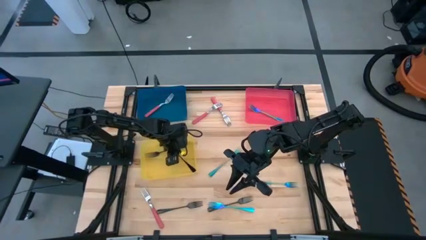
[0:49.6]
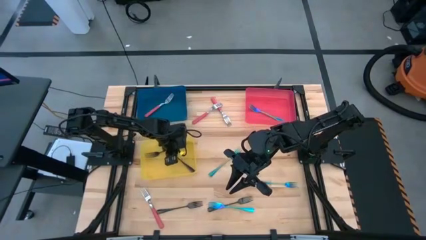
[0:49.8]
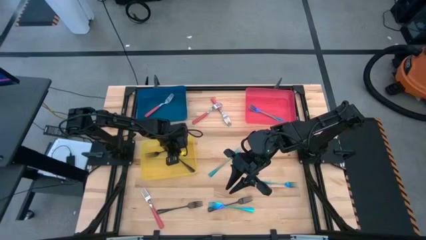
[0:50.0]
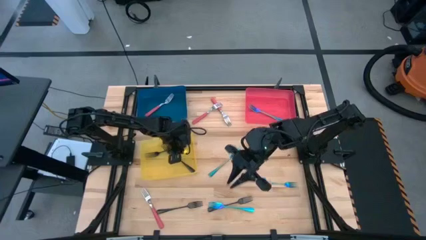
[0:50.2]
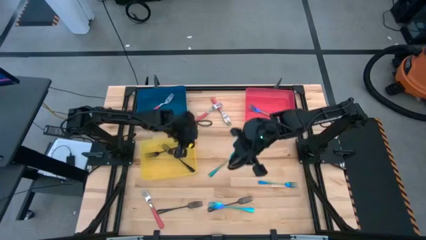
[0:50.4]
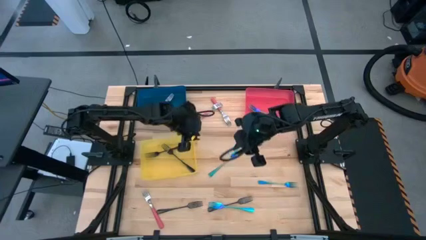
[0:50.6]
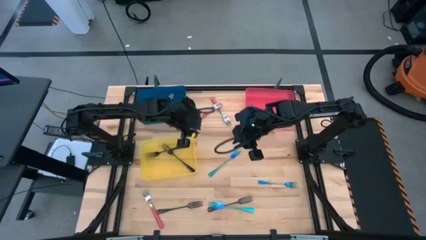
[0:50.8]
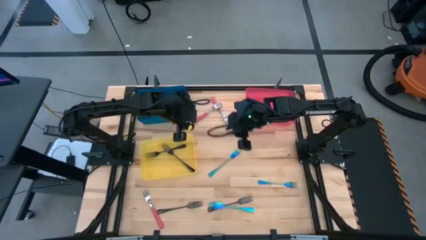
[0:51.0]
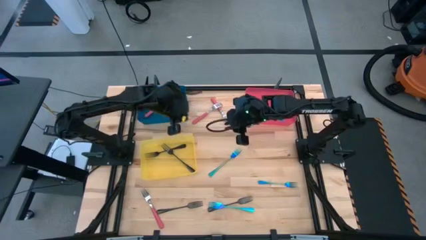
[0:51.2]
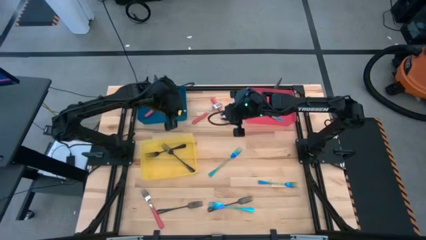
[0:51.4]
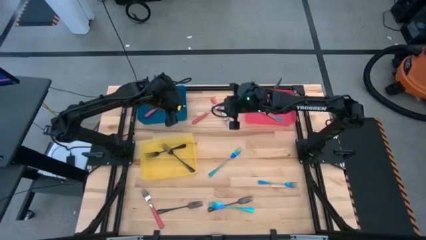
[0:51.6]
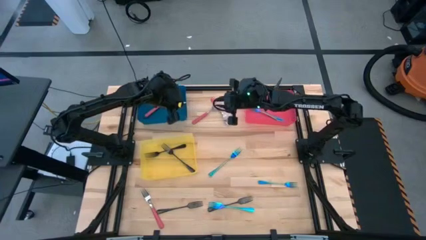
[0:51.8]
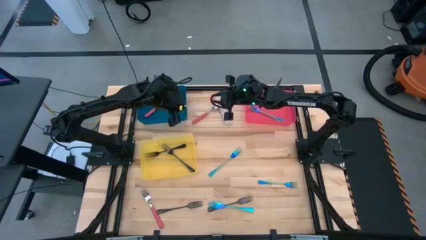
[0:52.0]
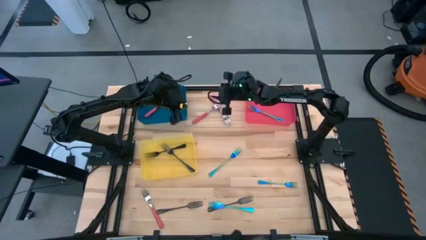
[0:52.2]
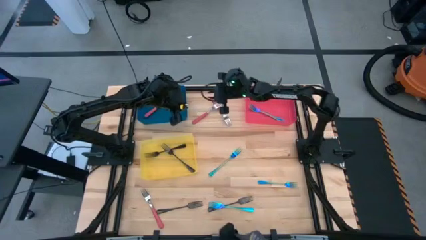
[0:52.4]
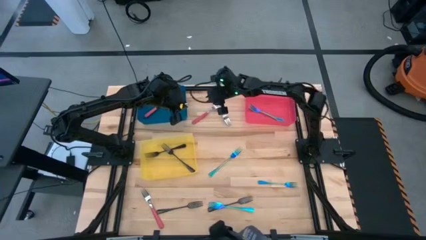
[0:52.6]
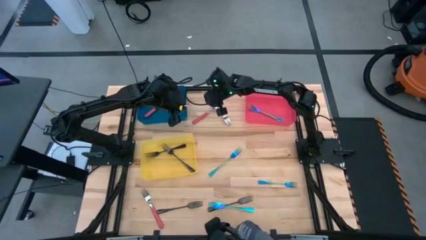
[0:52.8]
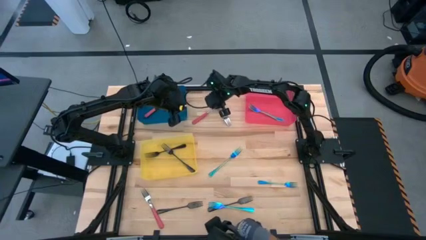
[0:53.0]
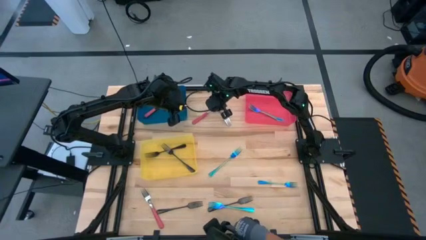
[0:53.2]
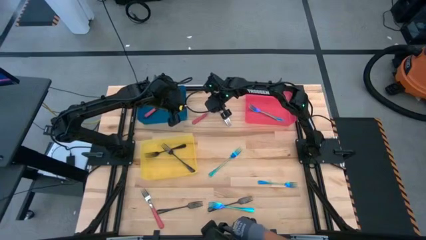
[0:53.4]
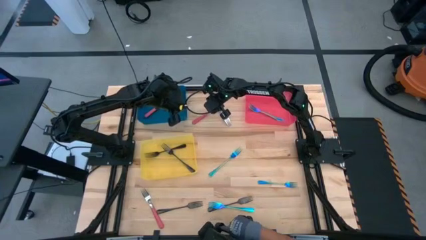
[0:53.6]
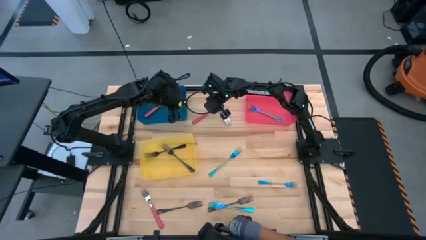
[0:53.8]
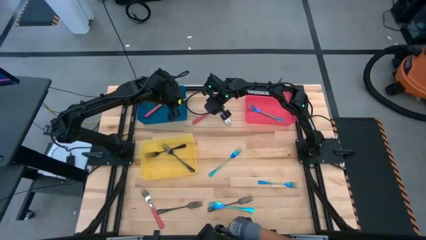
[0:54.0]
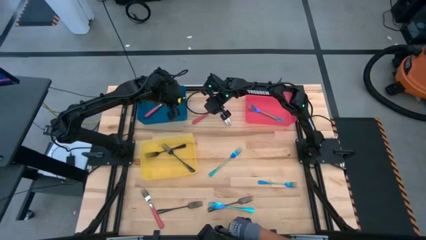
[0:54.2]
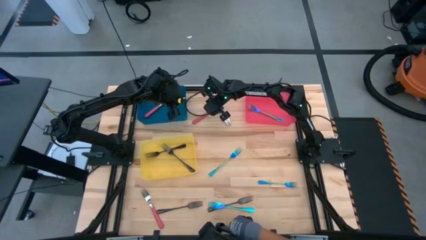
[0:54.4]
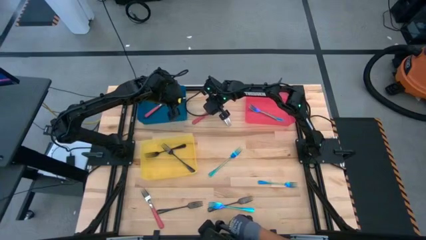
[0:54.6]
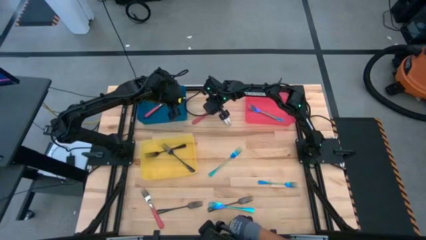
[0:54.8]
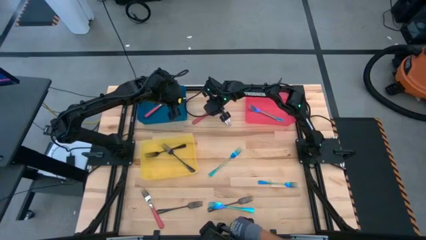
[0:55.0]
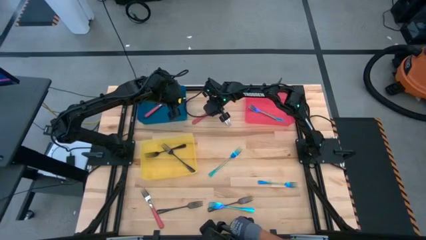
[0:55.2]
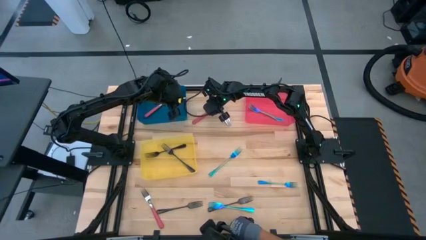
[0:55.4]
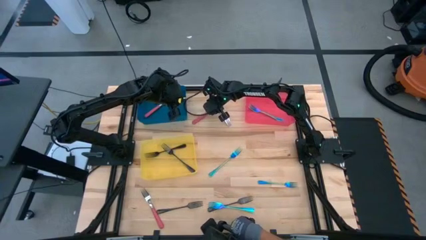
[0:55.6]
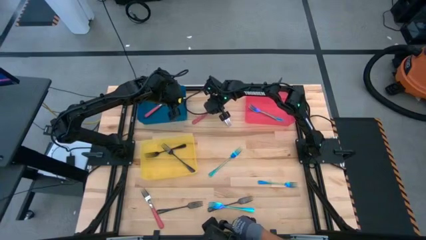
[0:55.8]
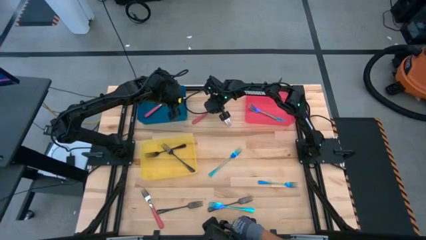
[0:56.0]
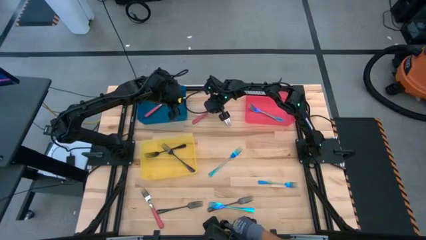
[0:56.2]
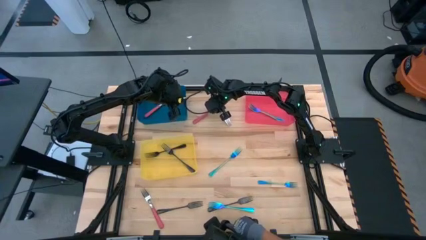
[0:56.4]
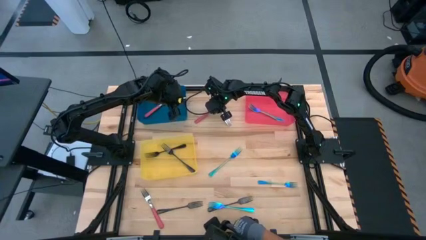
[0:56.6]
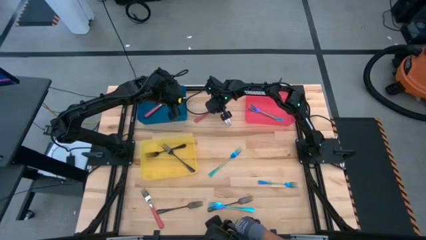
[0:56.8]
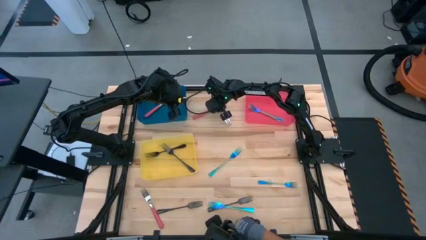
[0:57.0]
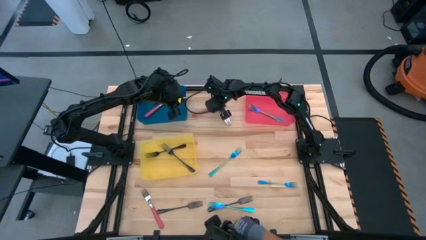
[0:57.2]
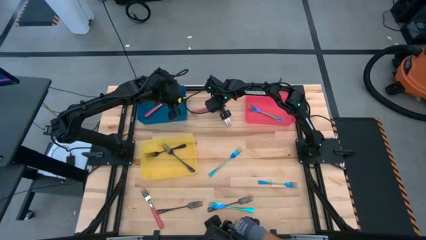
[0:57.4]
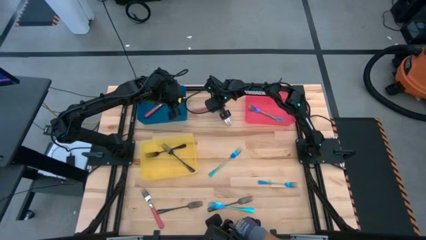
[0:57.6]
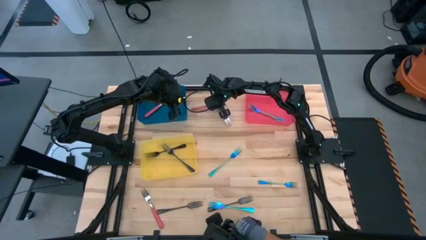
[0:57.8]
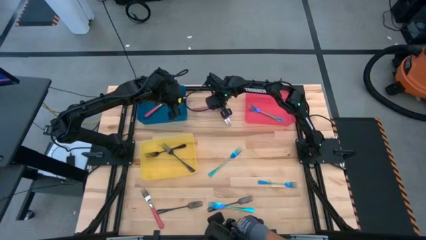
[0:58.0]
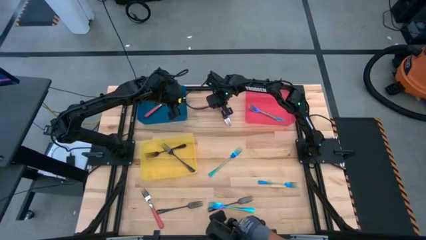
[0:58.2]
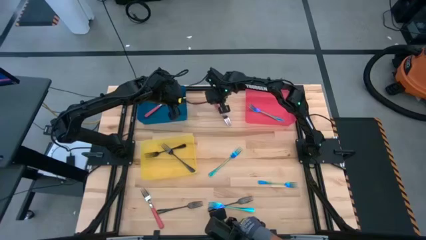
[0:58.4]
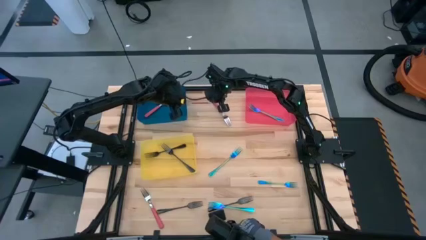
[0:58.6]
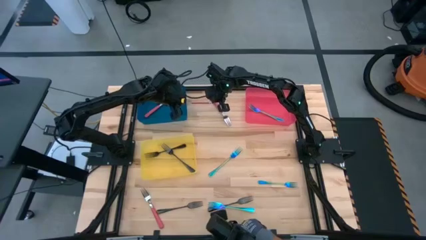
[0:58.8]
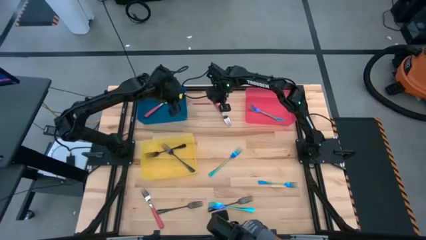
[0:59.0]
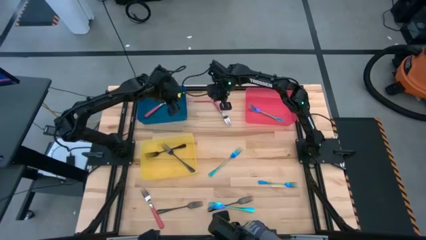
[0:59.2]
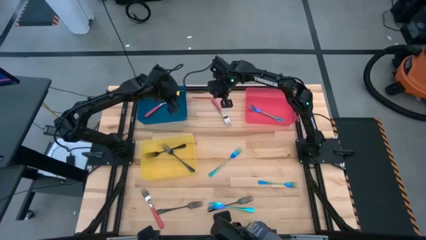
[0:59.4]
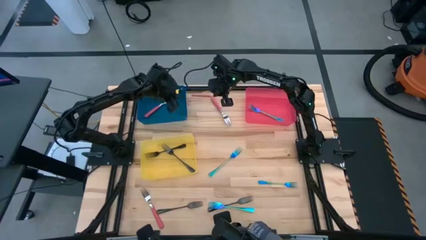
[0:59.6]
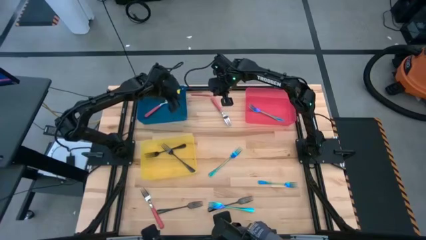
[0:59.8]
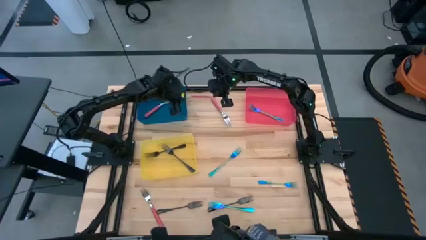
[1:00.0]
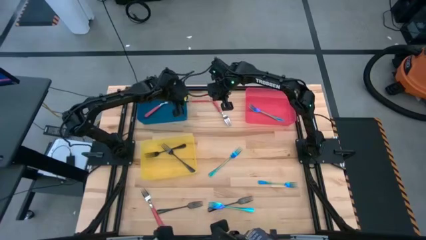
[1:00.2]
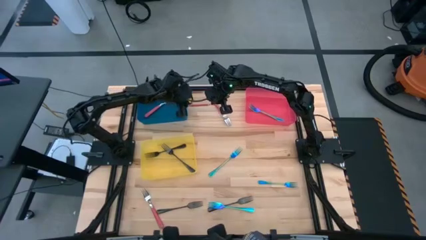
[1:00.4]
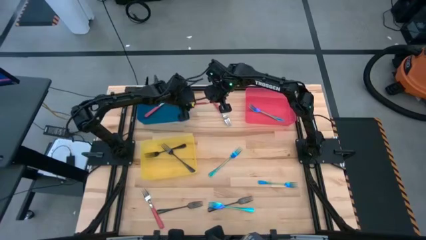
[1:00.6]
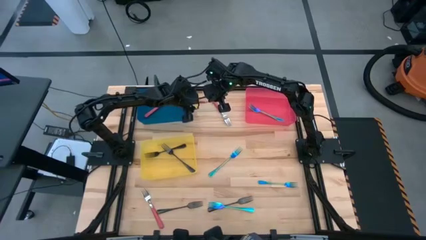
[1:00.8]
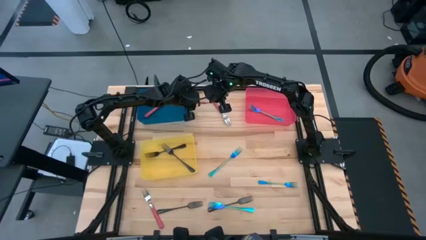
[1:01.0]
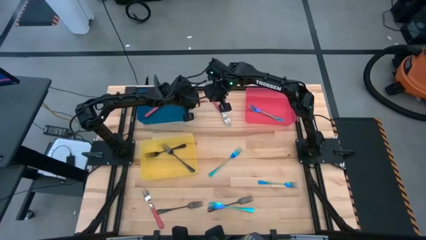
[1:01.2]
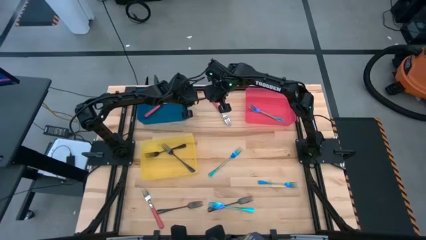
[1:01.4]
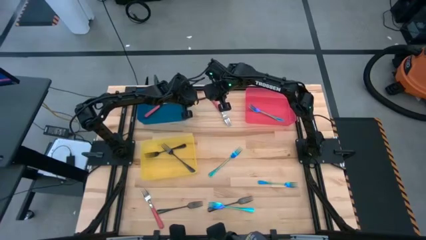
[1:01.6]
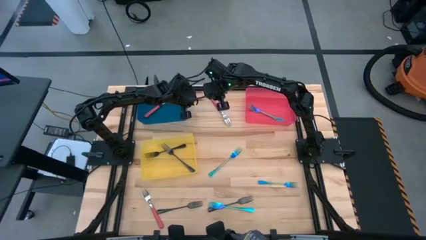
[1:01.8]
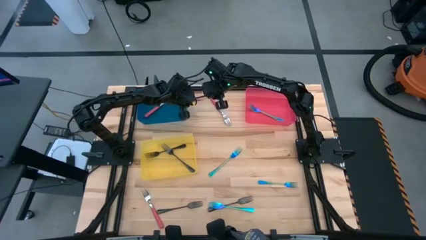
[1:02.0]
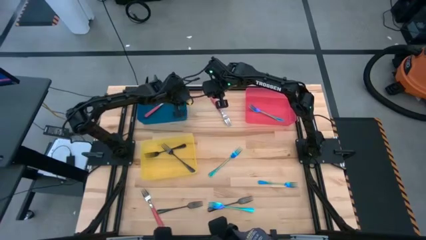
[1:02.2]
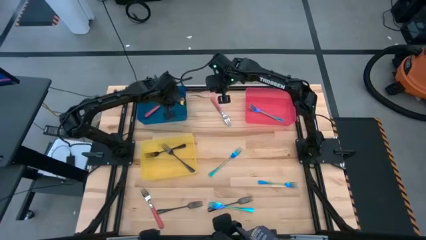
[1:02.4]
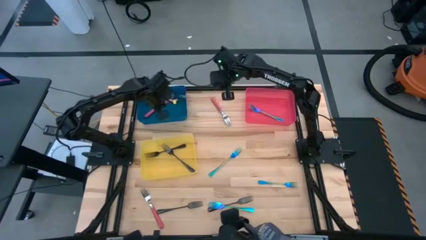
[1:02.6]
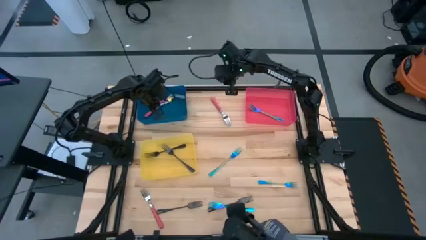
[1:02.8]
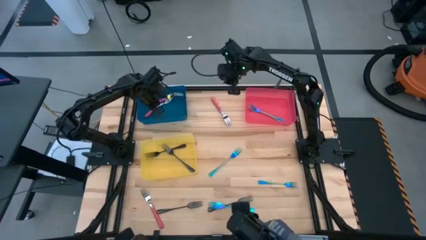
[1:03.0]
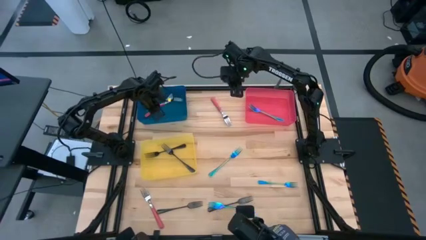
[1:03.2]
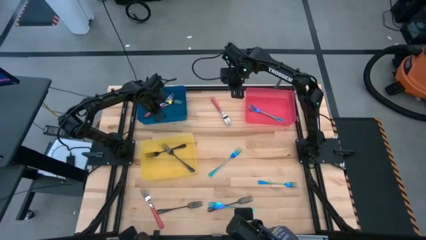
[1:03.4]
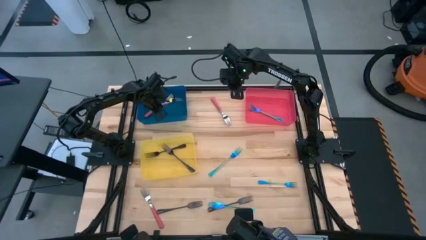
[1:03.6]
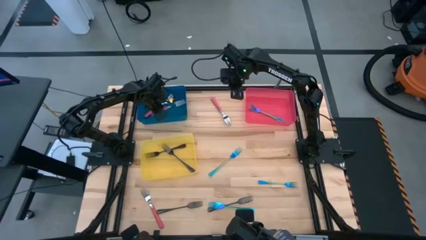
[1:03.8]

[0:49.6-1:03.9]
Task: Sort silverware by color (type)
Put the top middle pink fork into the blue bin

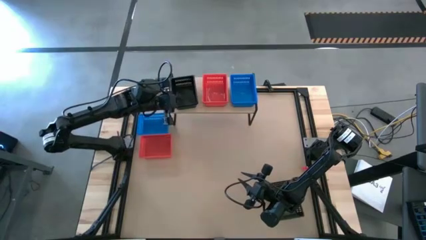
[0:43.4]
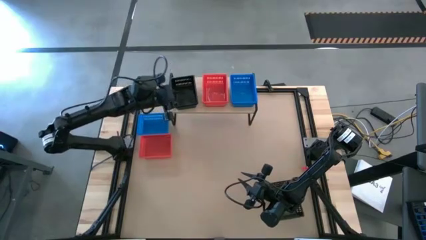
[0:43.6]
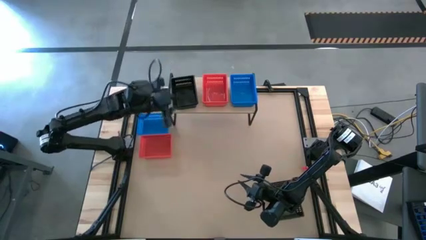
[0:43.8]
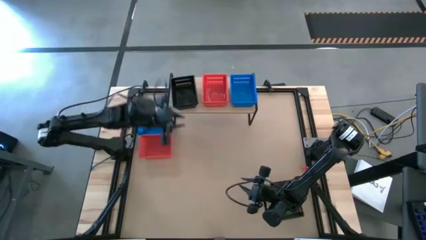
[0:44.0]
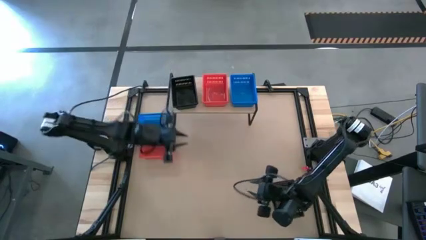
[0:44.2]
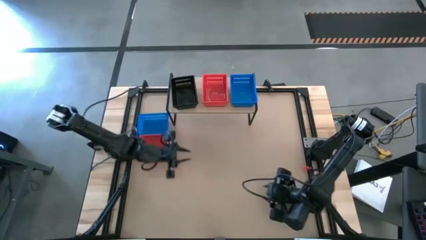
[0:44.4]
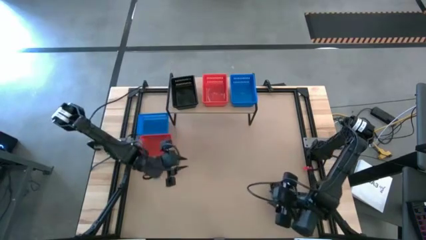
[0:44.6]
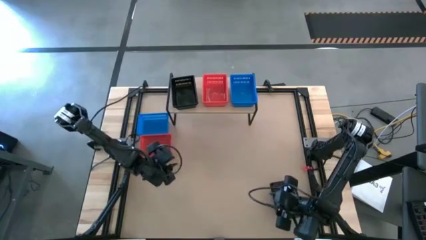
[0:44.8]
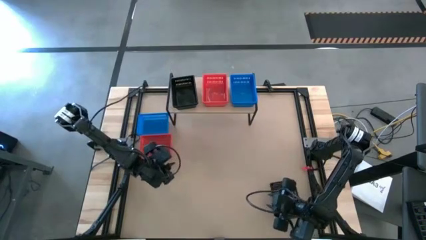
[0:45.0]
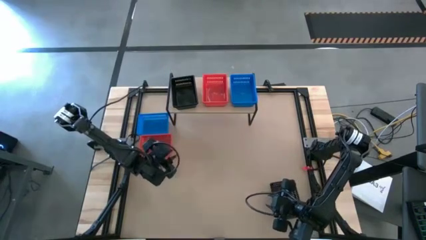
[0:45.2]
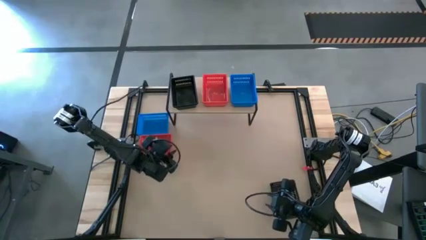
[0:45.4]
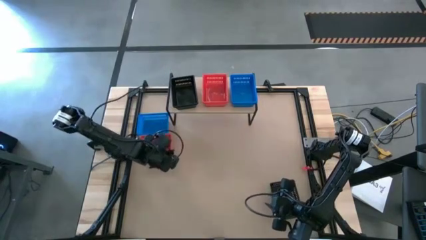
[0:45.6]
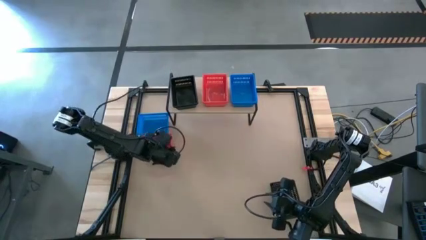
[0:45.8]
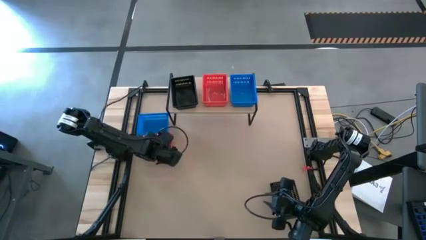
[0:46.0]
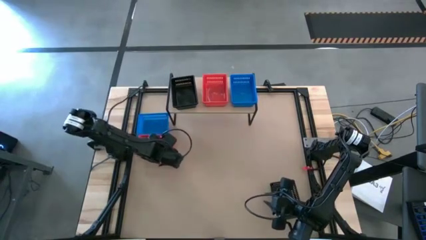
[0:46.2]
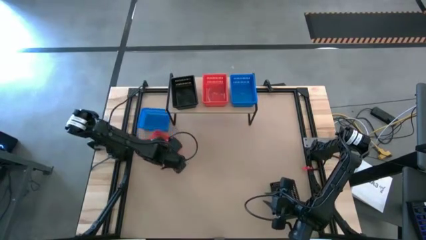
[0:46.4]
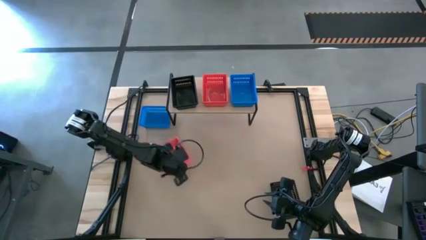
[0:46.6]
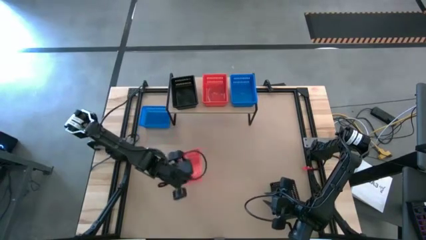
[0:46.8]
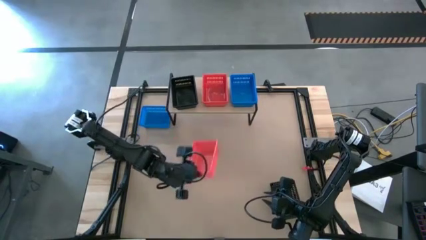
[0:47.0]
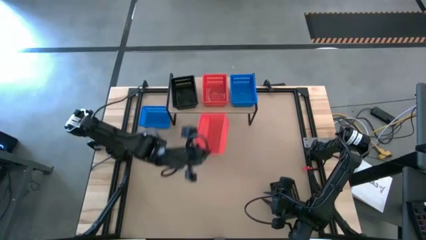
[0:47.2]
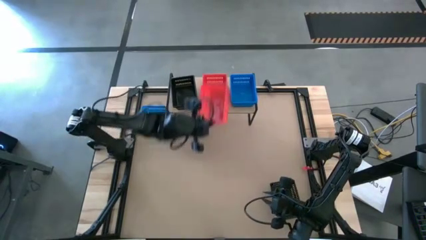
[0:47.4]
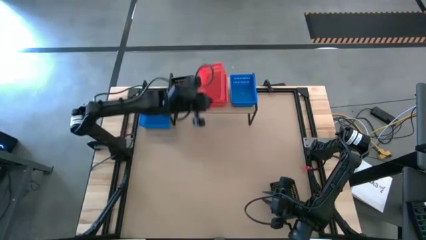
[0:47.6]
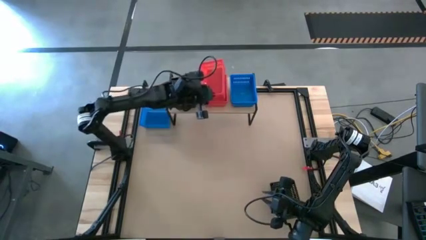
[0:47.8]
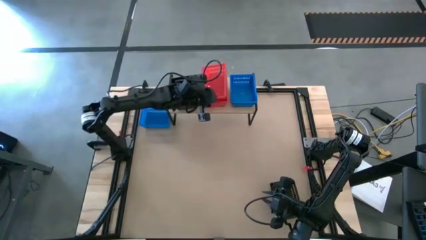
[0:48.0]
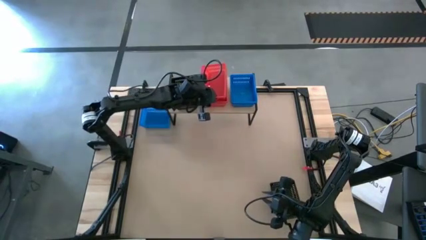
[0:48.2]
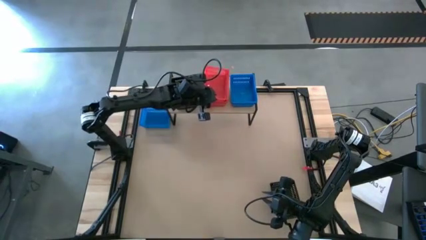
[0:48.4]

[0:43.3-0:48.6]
Task: Stack baskets on shelf by color
Stack the red bin on the red bins on the shelf
